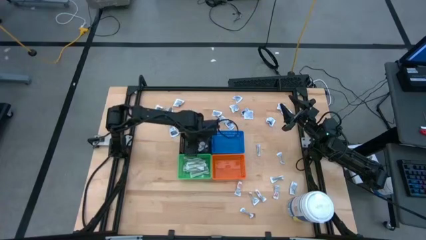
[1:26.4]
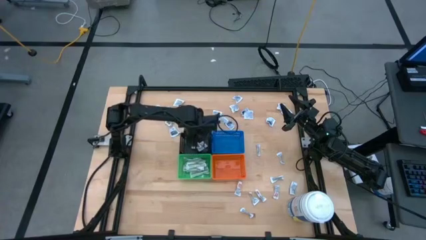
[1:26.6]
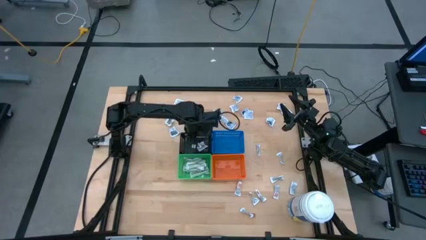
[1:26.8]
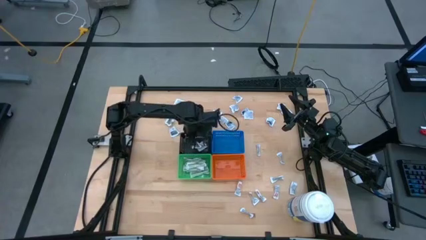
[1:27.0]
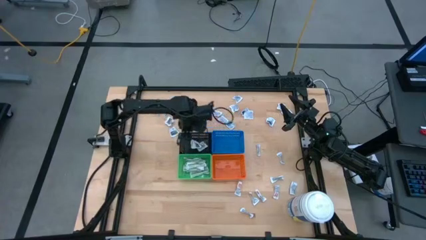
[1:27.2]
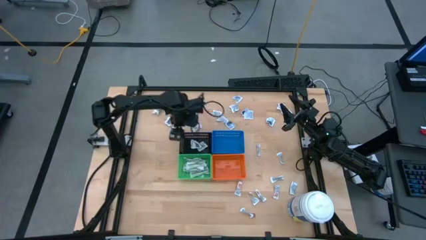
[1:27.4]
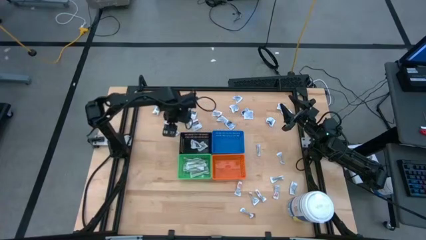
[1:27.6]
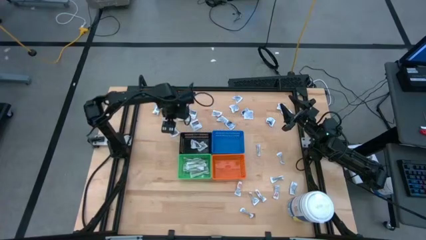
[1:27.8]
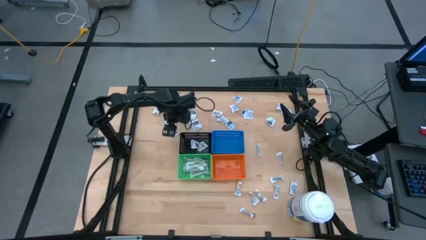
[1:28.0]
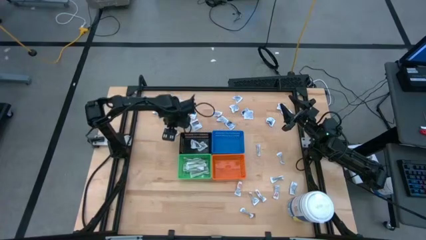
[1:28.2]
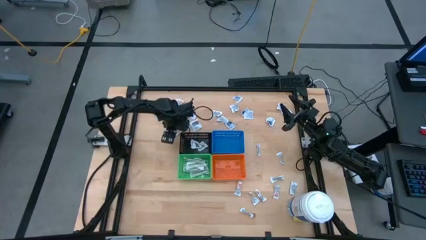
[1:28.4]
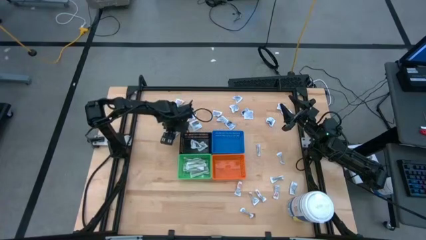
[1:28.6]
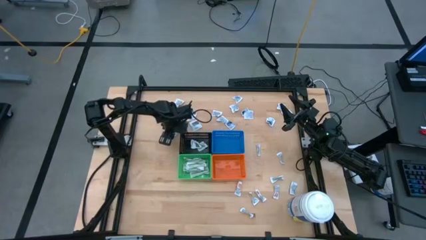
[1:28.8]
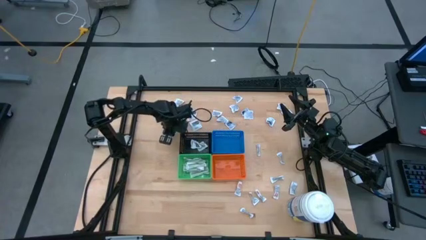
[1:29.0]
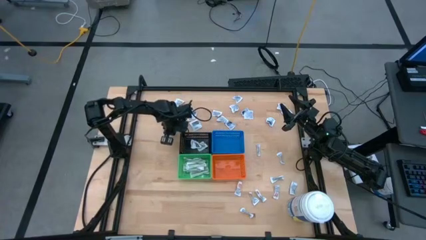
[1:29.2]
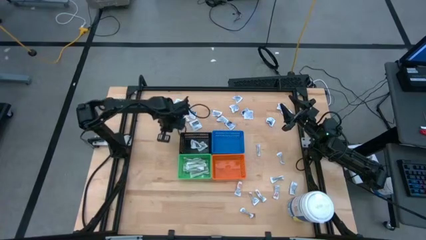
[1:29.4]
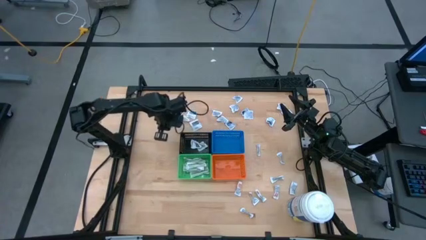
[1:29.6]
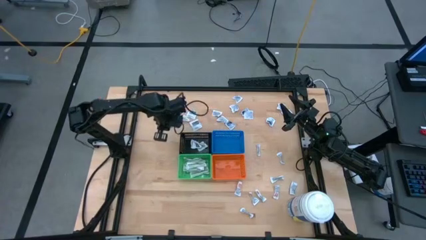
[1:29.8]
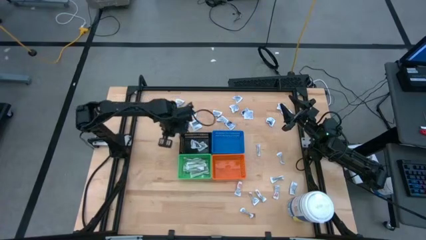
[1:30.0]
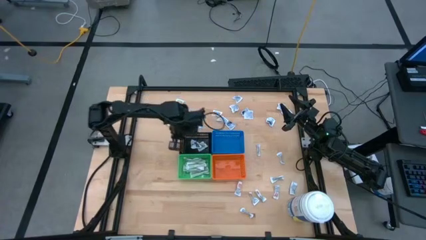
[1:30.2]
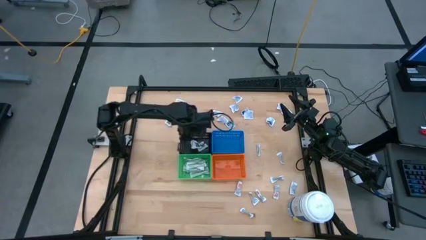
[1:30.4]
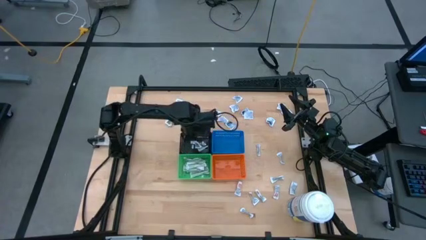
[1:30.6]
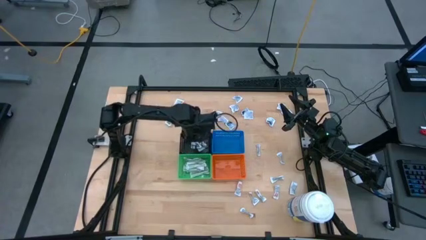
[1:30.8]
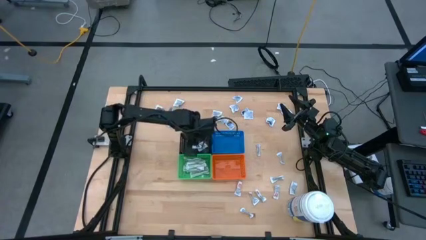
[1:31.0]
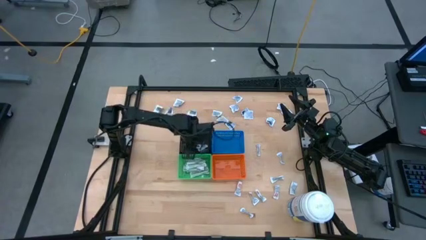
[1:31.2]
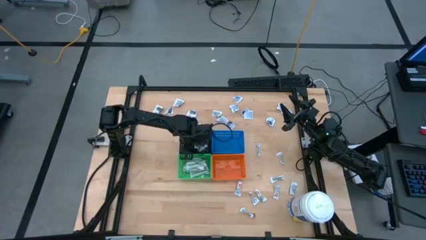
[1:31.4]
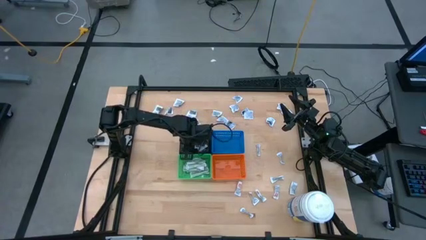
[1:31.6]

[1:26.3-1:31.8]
Task: Pick & Place First Aid Supplies
Put the towelette pack into the black bin

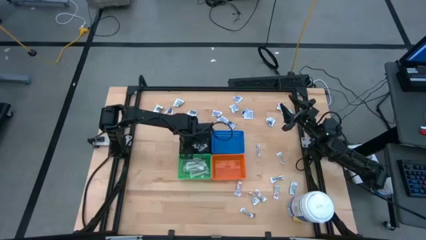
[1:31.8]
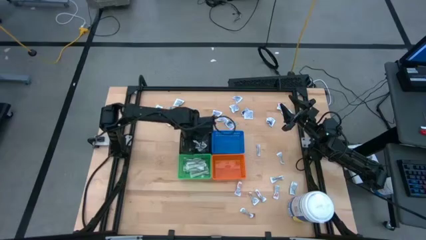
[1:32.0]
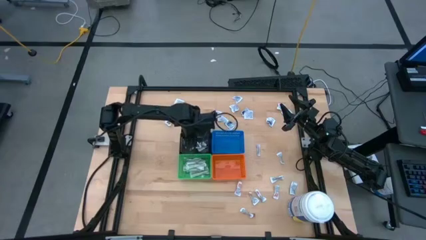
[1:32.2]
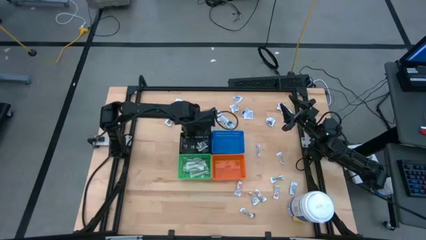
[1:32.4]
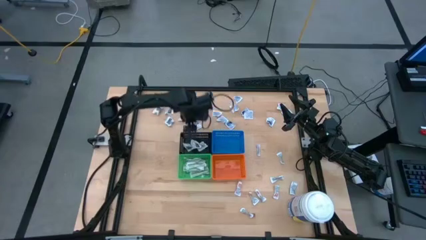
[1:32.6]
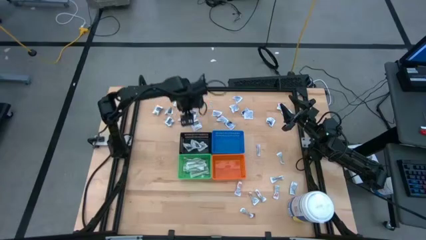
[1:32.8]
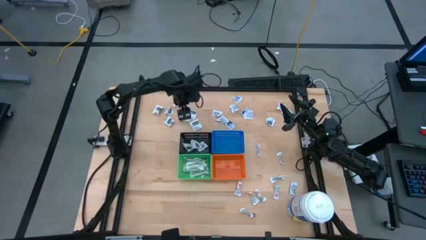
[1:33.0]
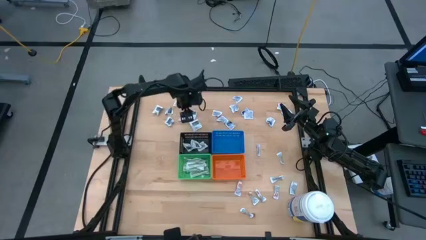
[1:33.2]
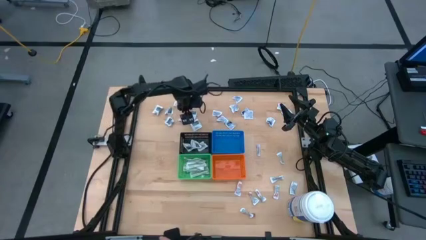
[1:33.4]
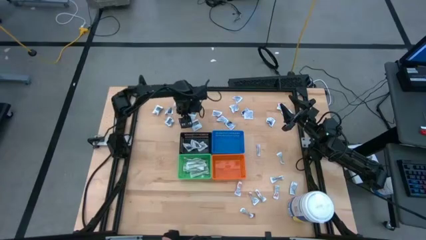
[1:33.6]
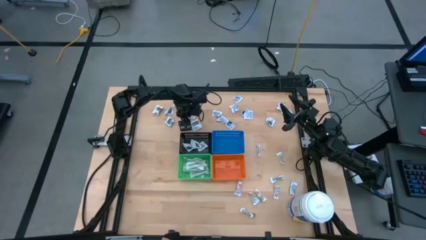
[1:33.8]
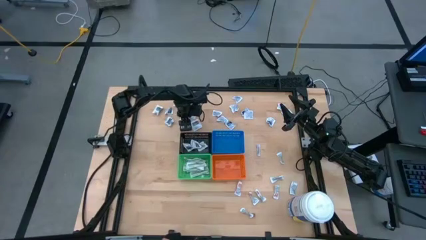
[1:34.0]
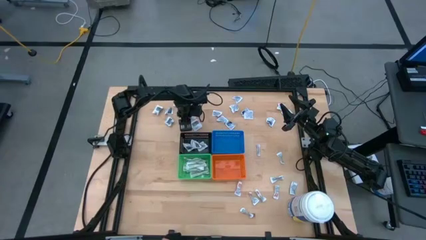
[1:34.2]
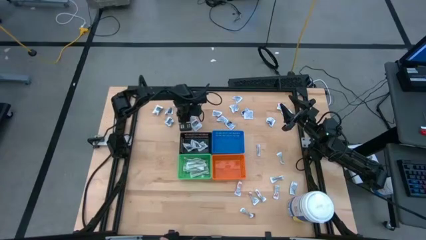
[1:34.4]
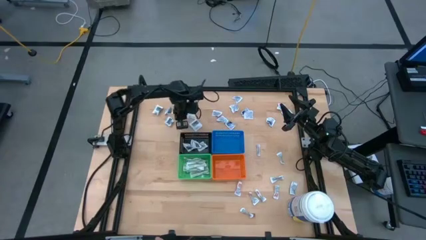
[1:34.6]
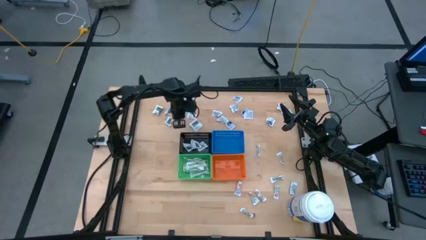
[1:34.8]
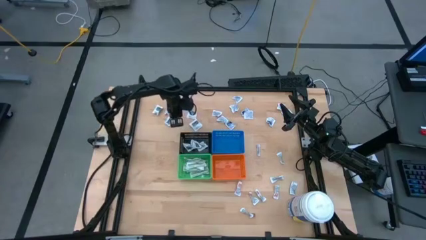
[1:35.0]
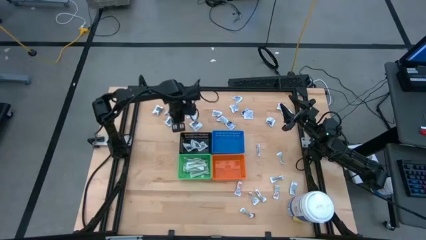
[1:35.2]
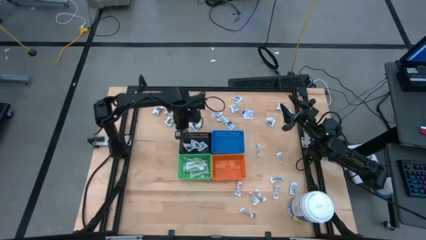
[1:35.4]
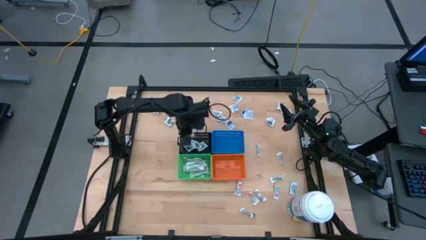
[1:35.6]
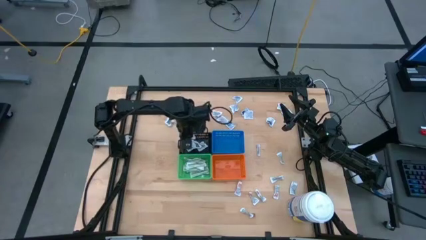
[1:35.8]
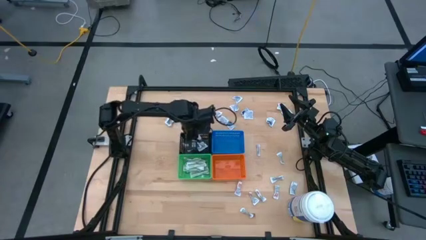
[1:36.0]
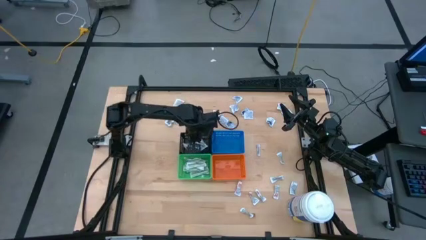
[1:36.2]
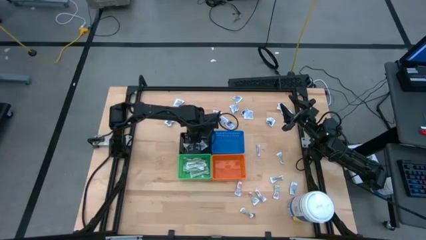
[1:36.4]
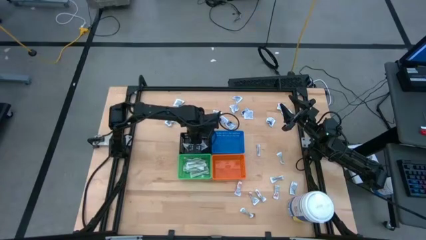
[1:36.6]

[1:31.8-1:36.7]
Put the towelette pack into the black bin

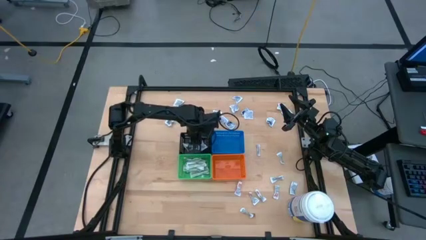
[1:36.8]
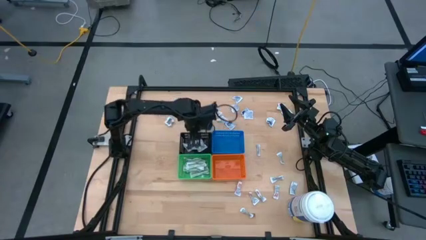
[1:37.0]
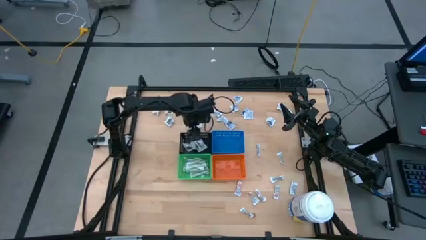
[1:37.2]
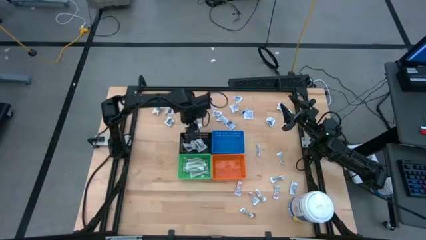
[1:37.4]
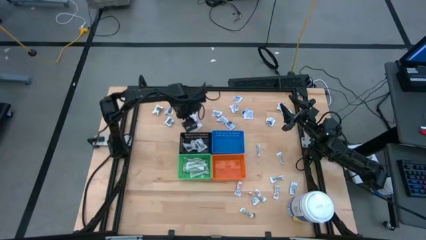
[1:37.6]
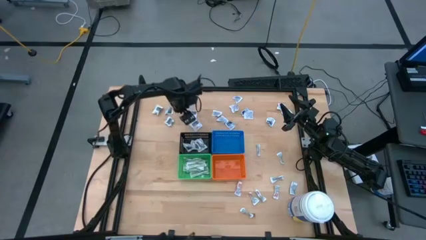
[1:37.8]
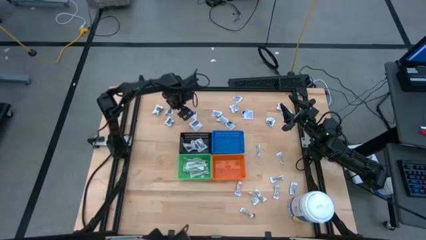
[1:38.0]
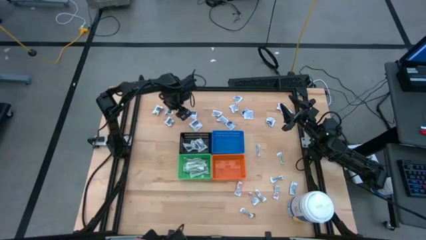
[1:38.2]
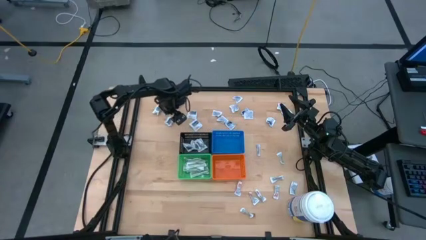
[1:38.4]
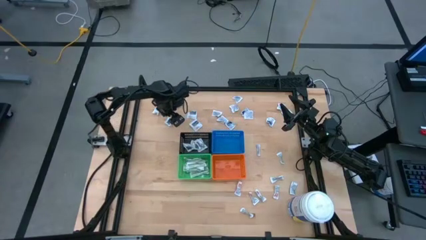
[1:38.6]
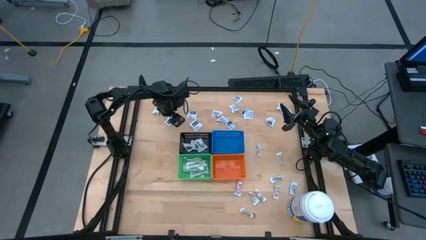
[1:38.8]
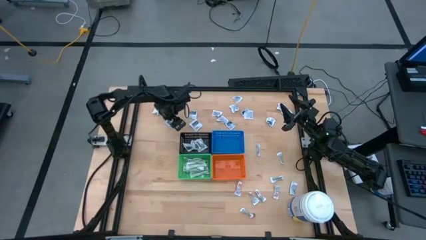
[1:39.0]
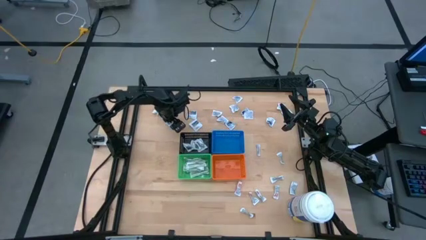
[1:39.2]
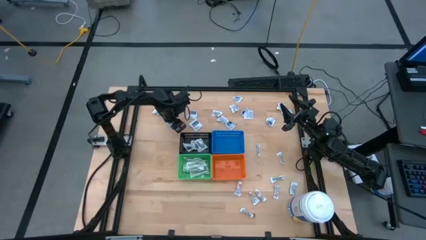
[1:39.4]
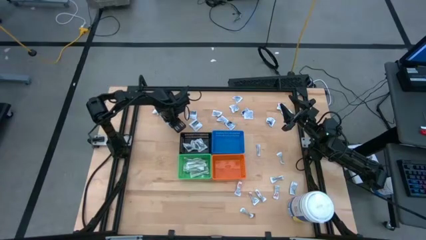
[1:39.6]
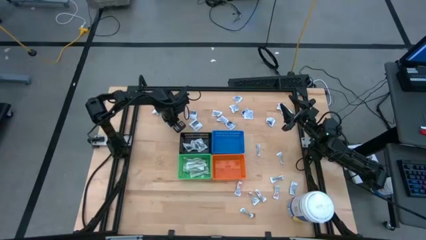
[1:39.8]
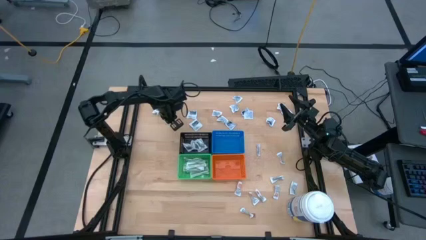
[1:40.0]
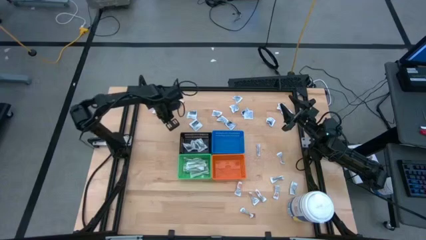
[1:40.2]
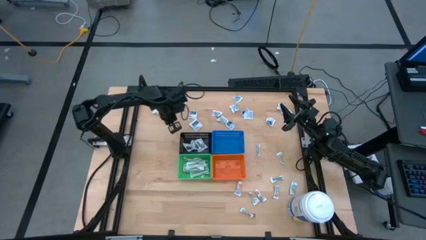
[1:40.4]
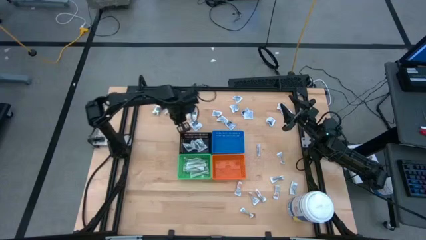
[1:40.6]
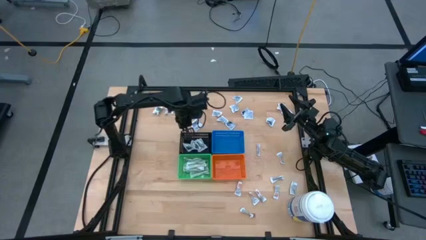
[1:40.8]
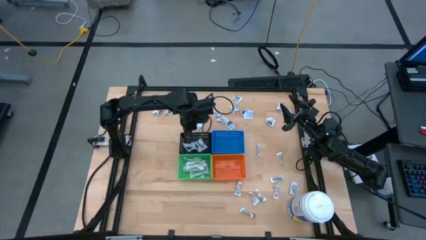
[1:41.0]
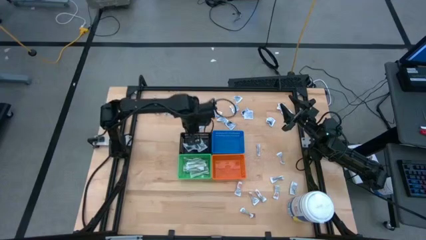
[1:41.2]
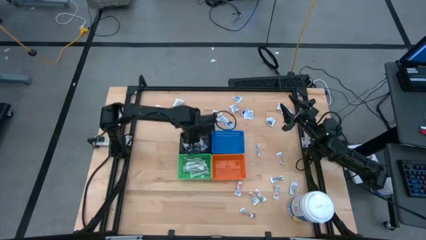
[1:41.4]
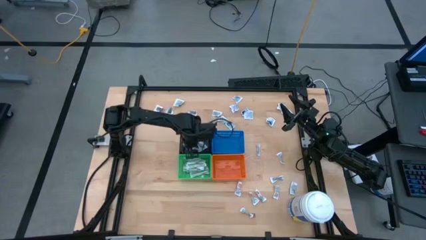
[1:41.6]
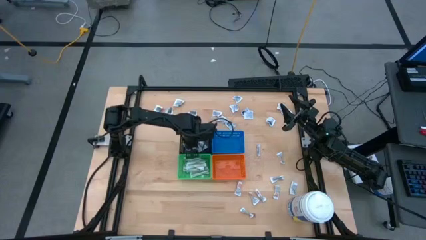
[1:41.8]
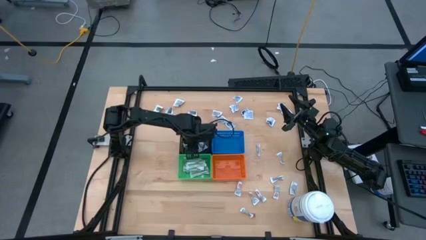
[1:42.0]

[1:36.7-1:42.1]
Put the towelette pack into the black bin

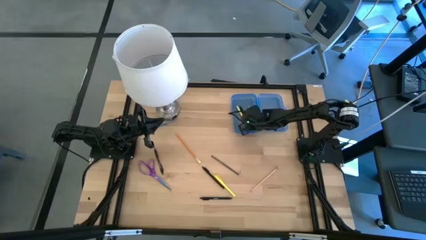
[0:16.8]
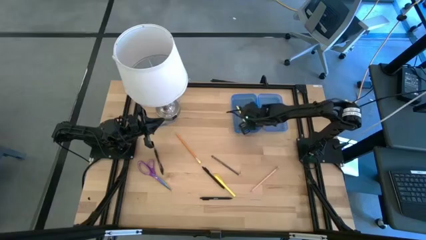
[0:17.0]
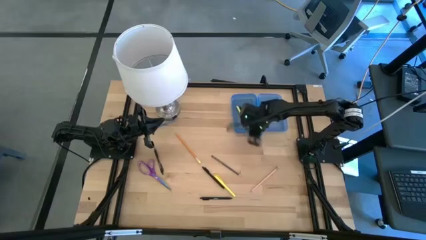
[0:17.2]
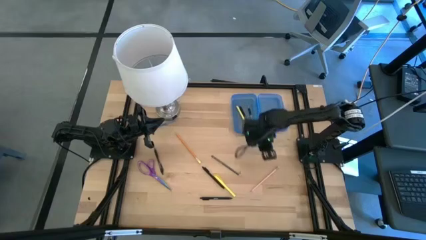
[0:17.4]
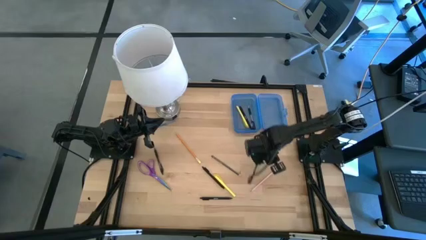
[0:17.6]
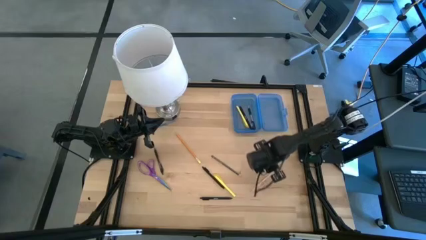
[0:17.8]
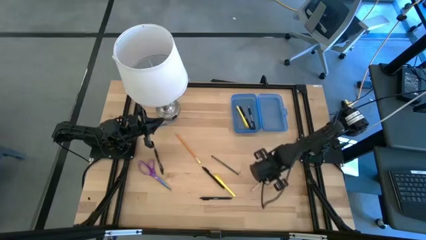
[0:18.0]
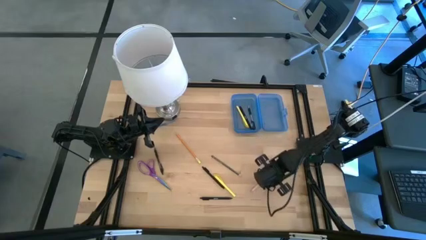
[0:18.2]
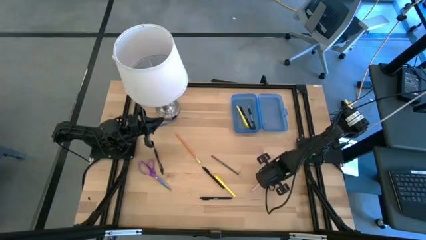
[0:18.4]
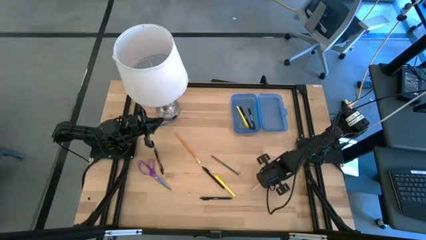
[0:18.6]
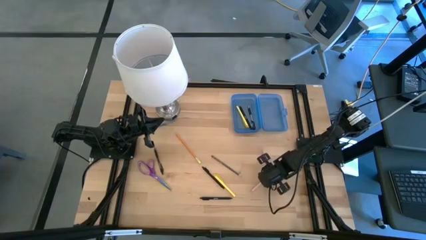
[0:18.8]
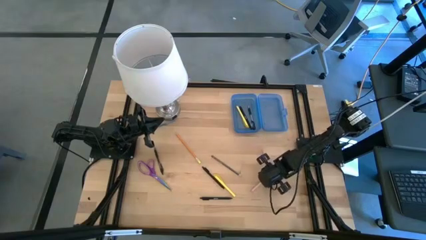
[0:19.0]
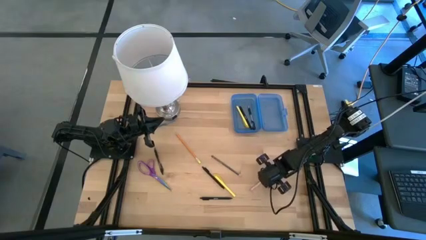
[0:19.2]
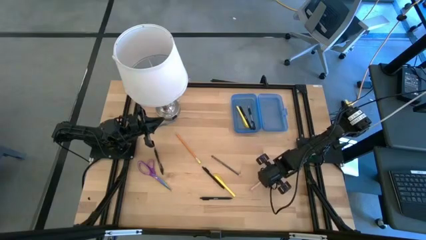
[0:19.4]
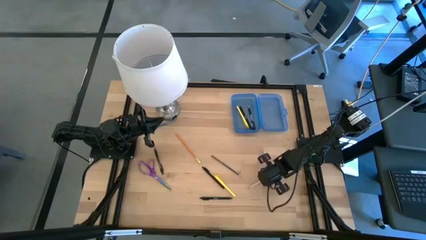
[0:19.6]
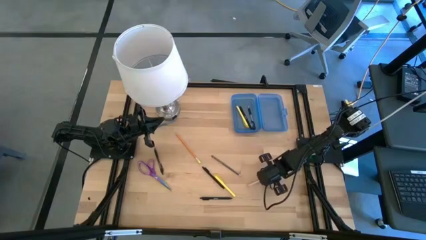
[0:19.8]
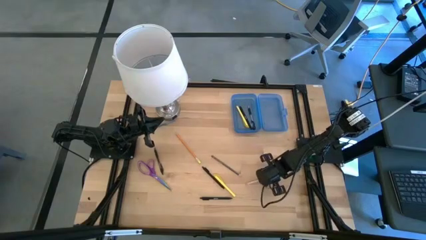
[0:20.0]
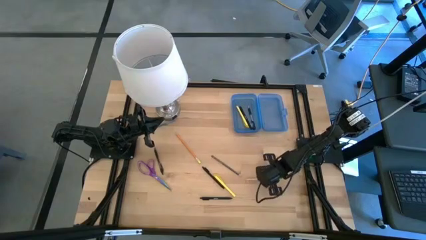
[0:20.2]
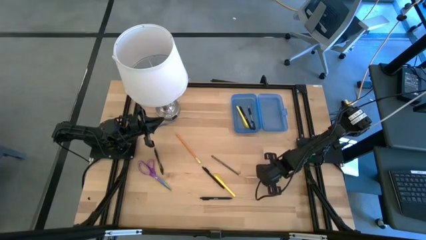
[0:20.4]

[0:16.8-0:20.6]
Task: Pick & place school supplies into a supply box
Put the pink pencil into the blue supply box
